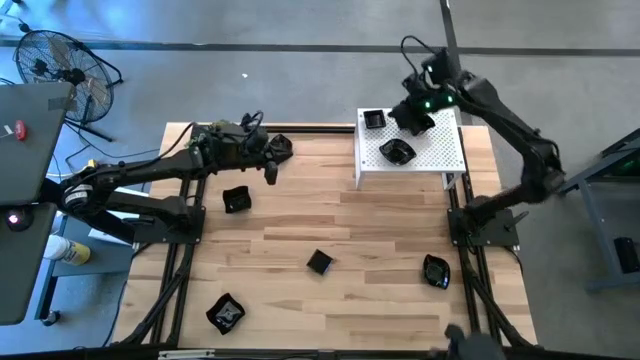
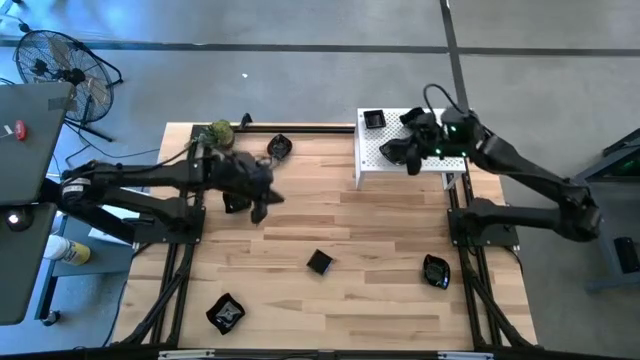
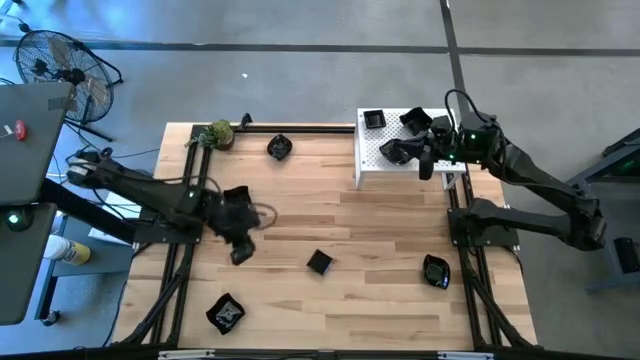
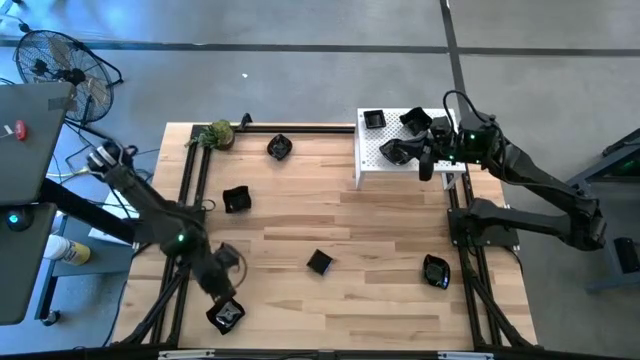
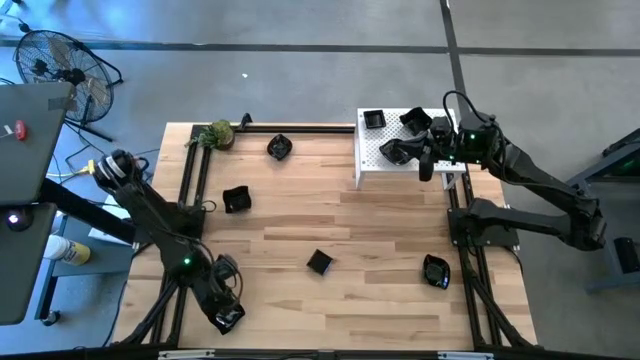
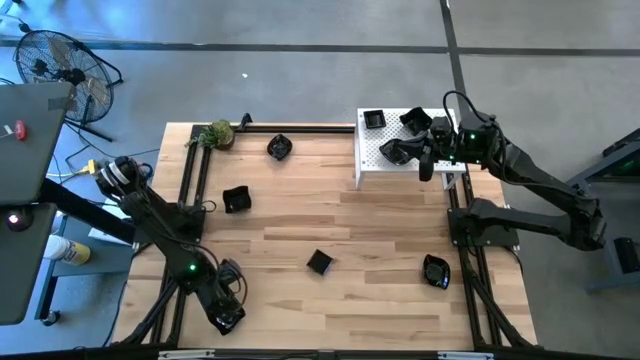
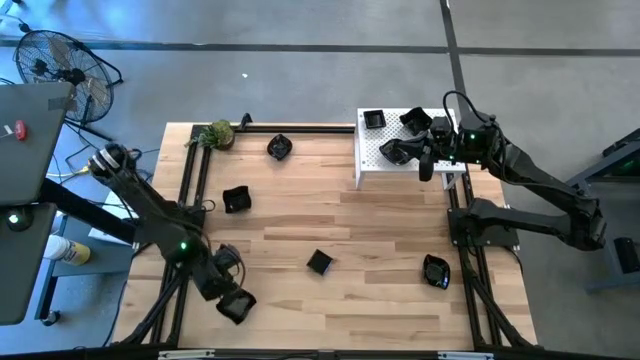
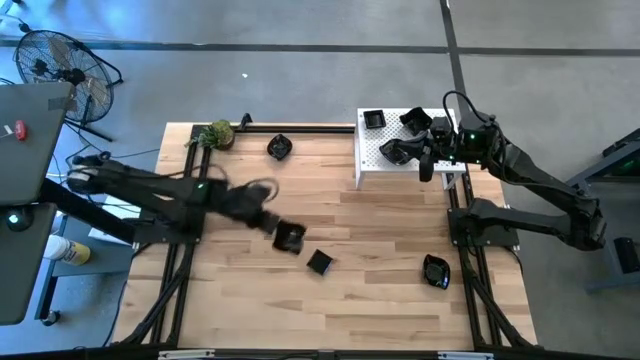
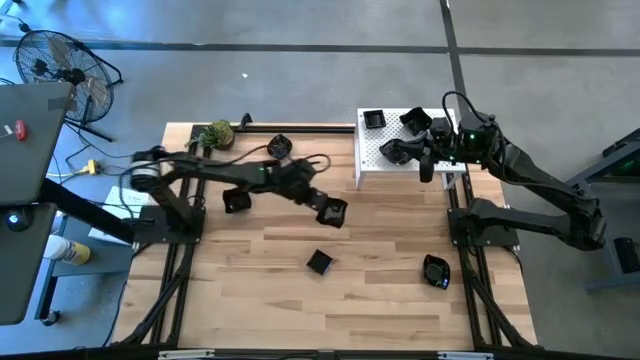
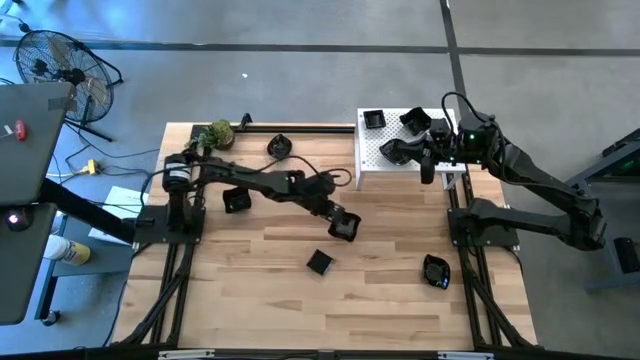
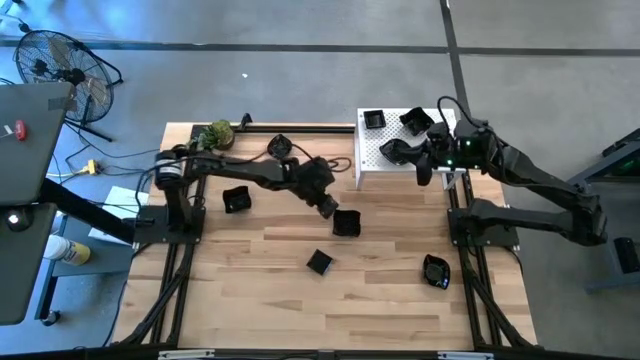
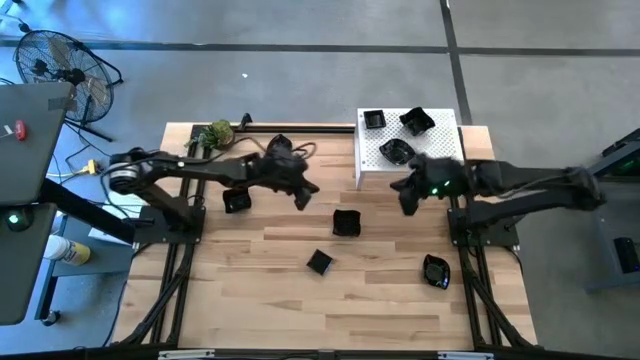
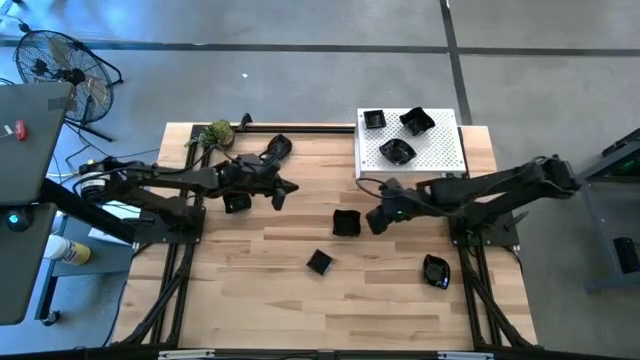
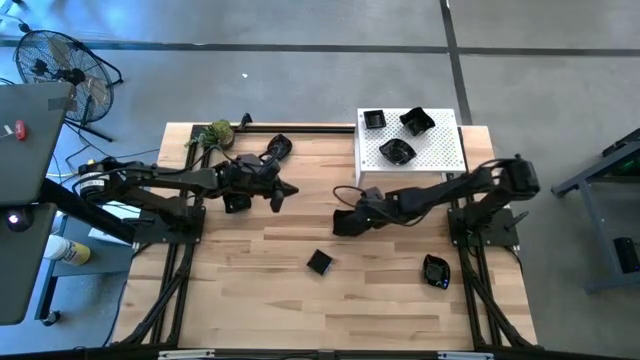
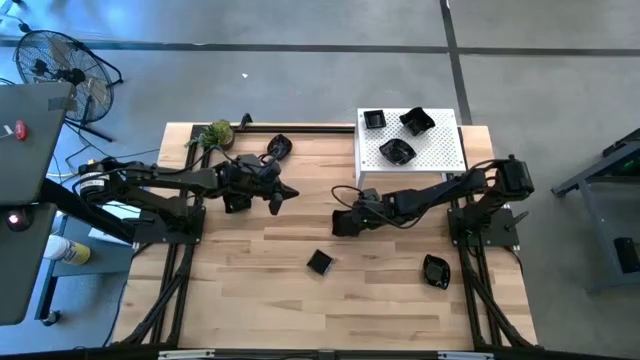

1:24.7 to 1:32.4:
Task: Pick & Place Mini shaped plates
Stack the distorted square plate on top of the stacked distorted square plates on the shelf

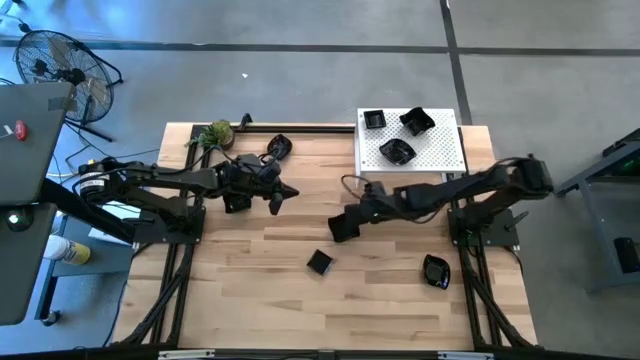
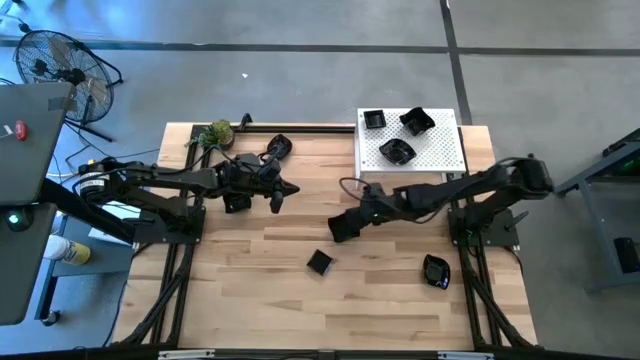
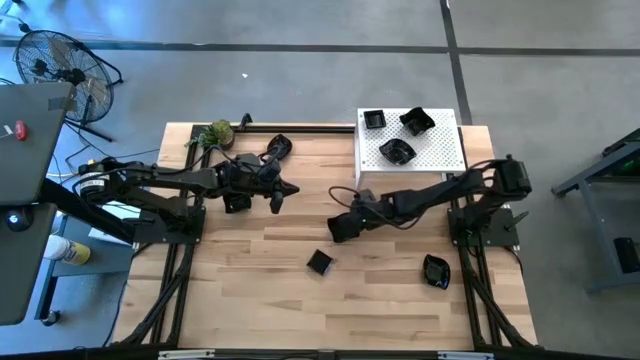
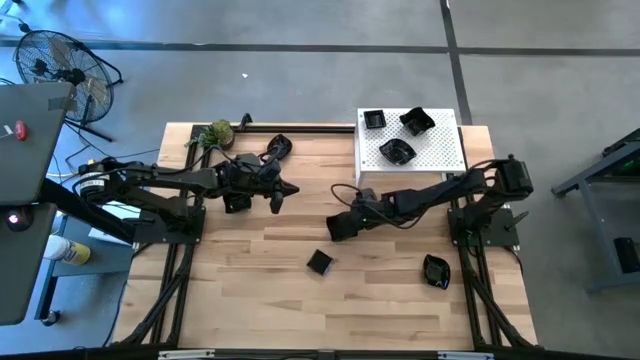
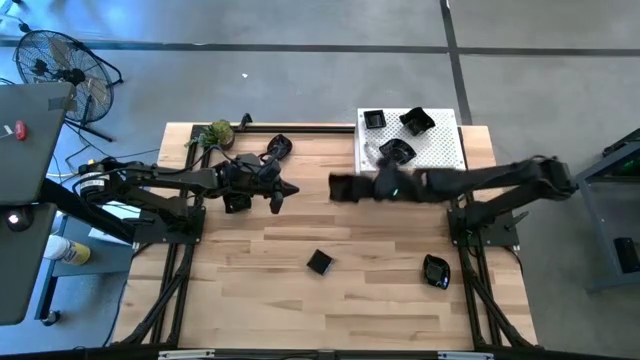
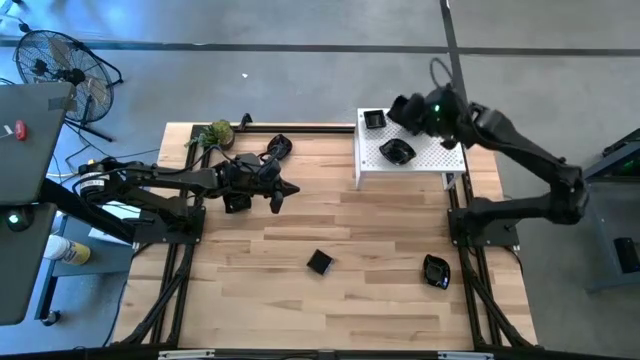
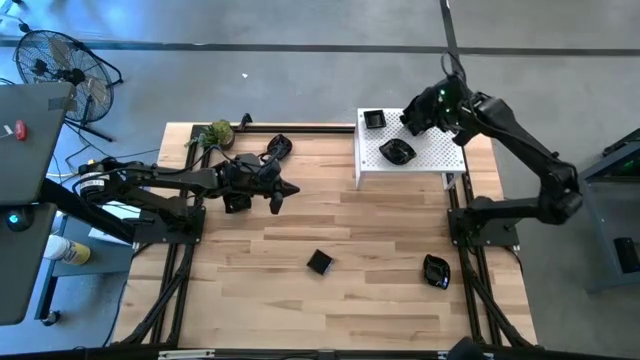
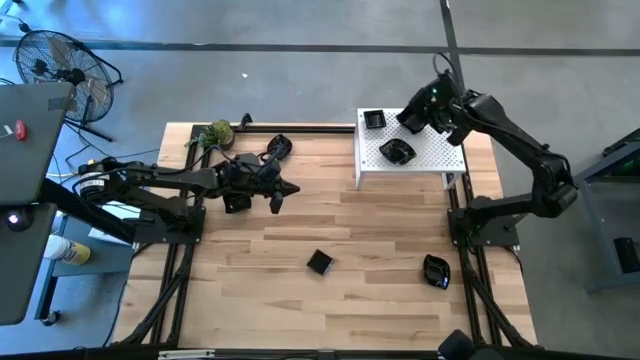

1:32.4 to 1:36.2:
Stack the distorted square plate on top of the stacked distorted square plates on the shelf

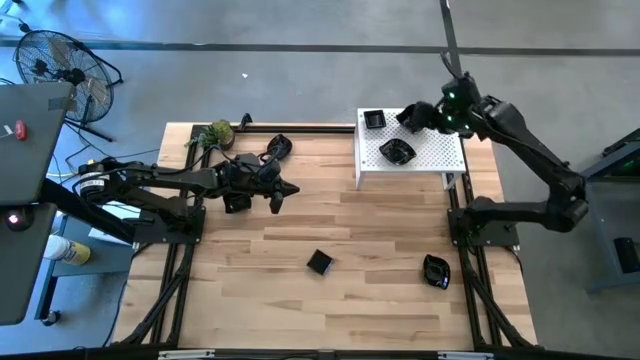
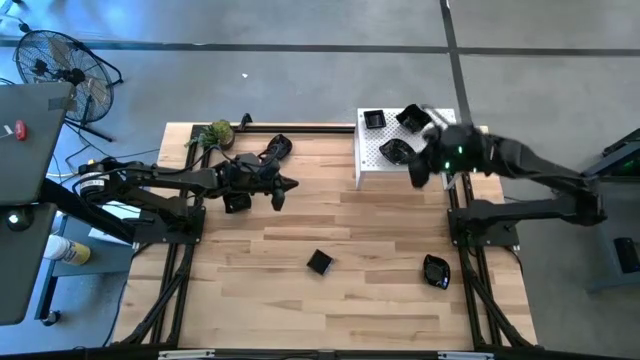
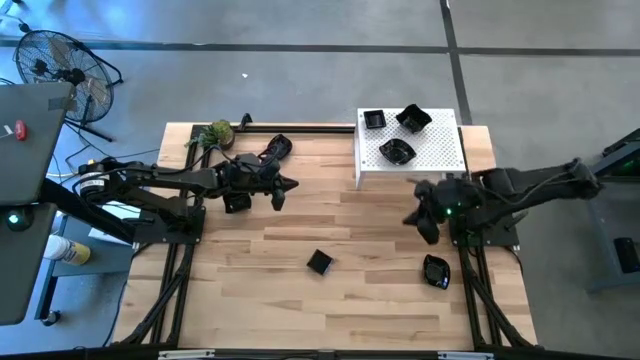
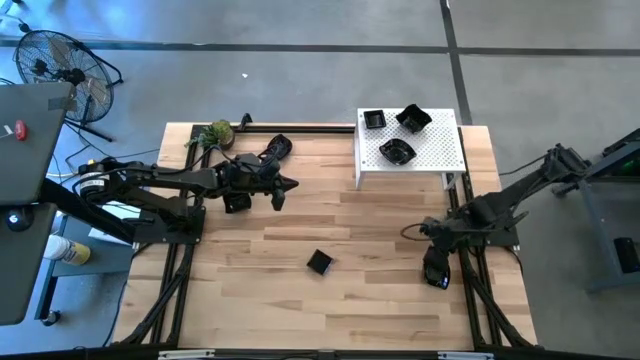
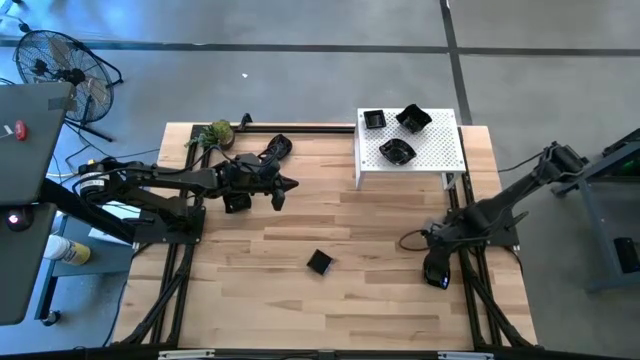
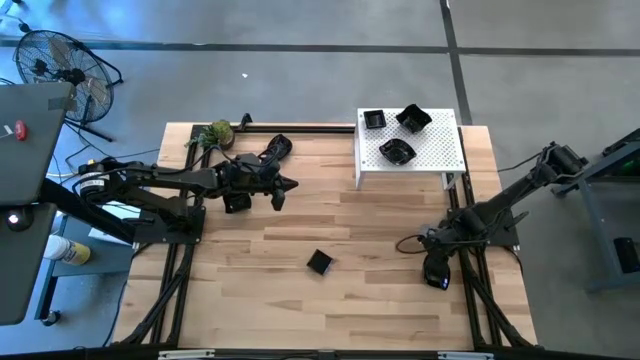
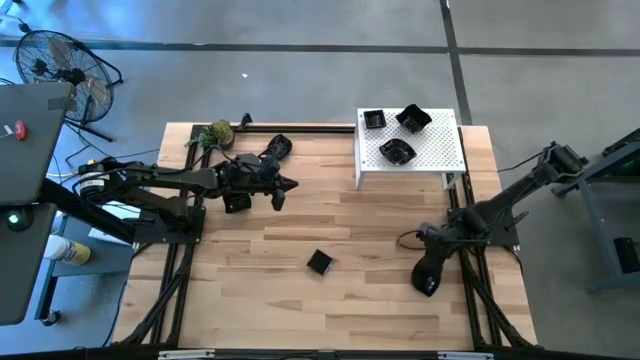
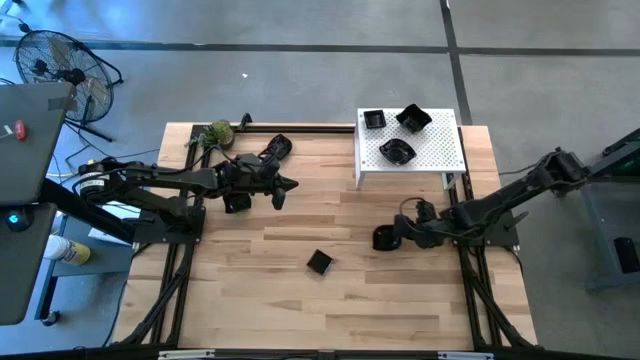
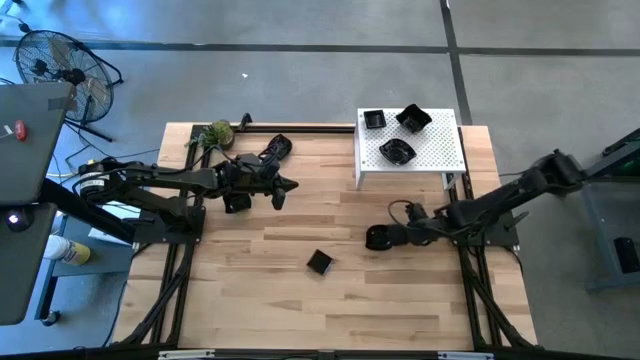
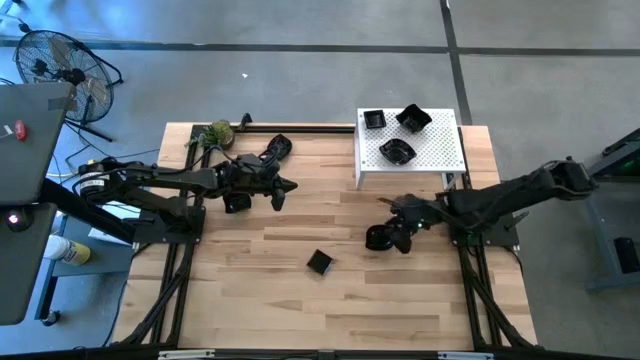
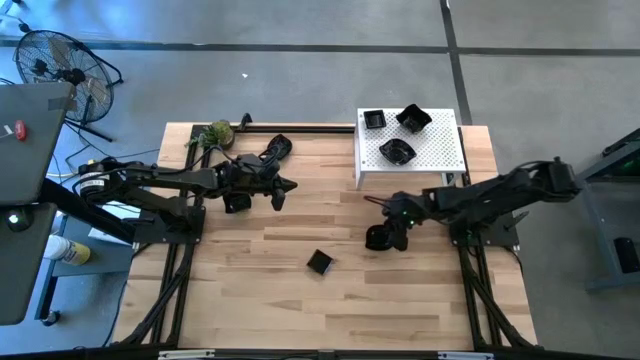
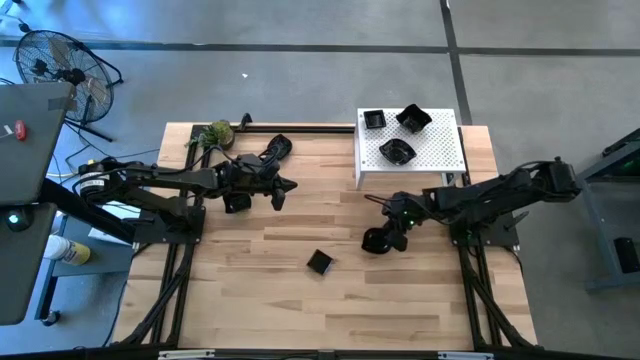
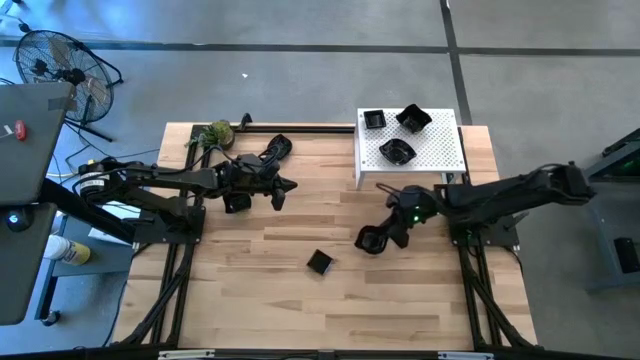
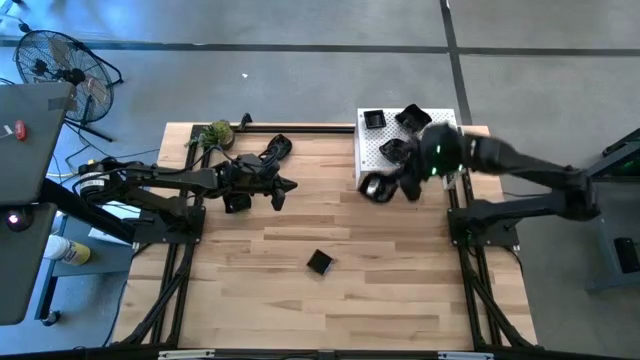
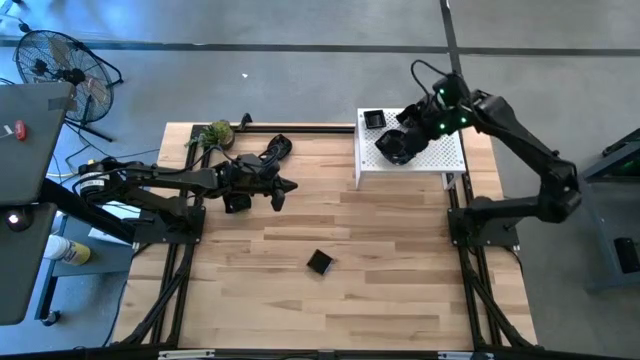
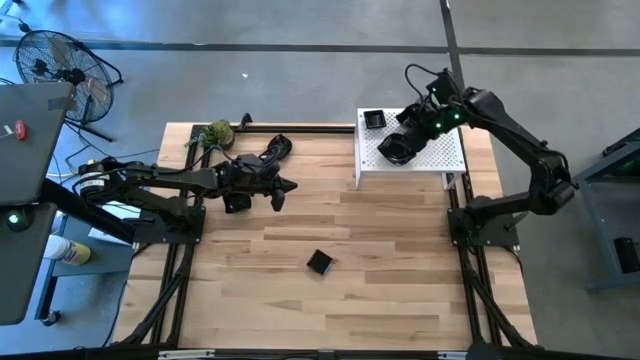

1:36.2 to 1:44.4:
Stack the leaf-shaped plate on top of the stacked leaf-shaped plates on the shelf

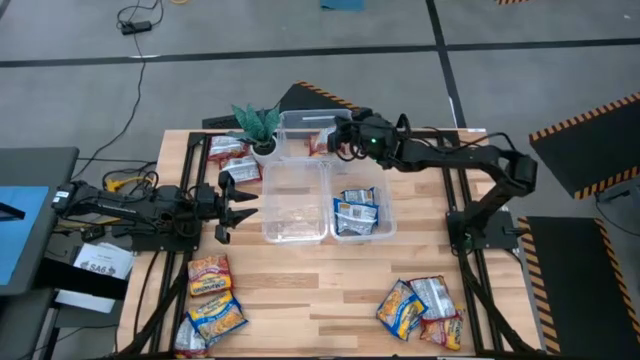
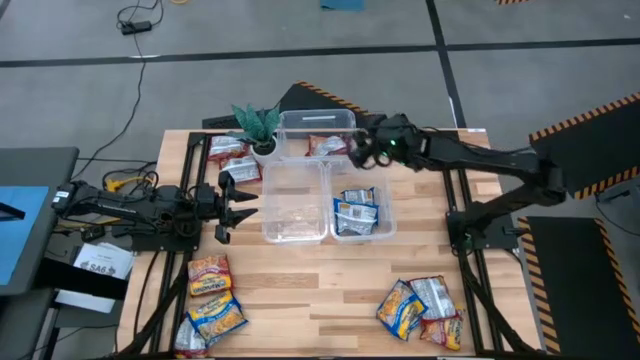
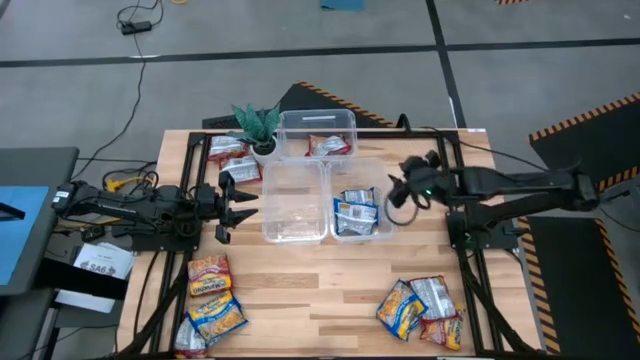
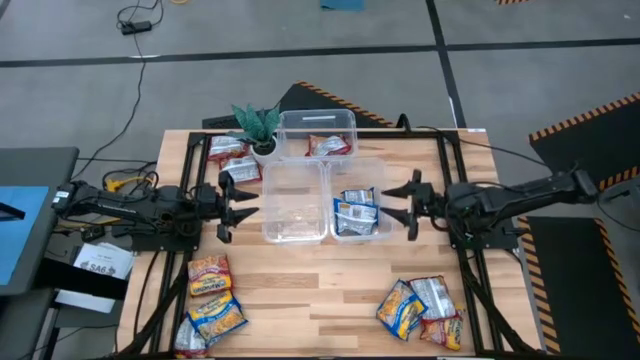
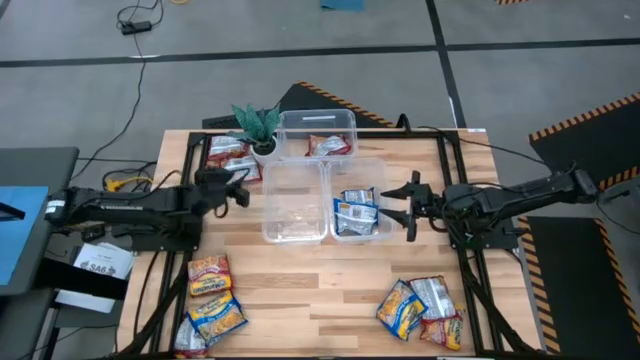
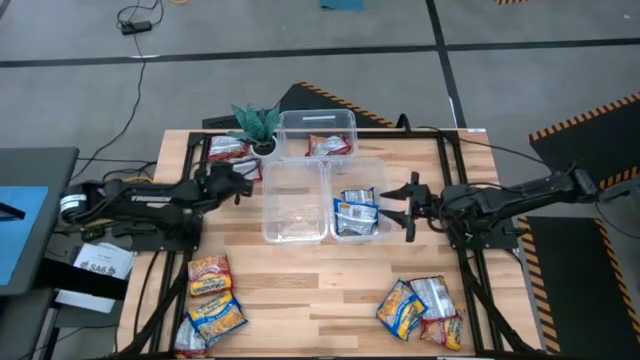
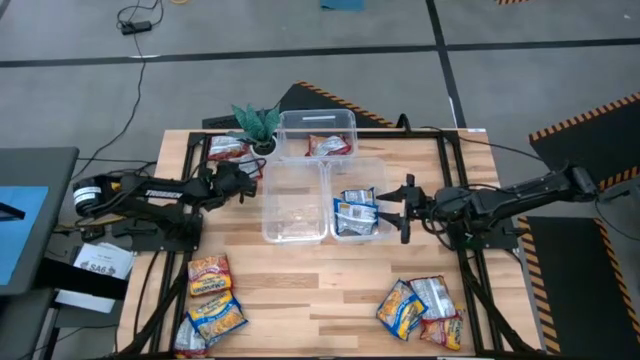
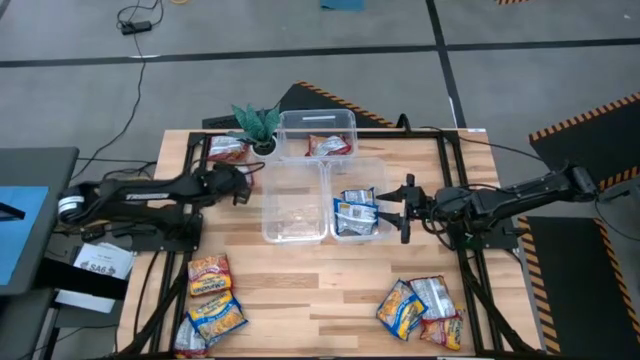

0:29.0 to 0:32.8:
Task: Sort Maruchan noodles
Put the red noodle pack into the top transparent bin
